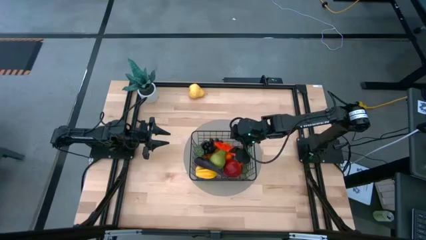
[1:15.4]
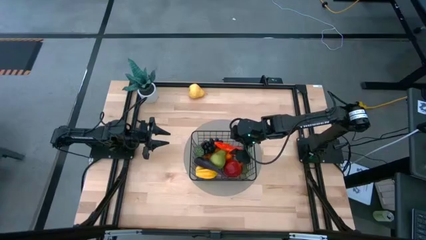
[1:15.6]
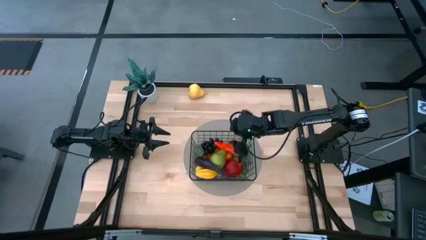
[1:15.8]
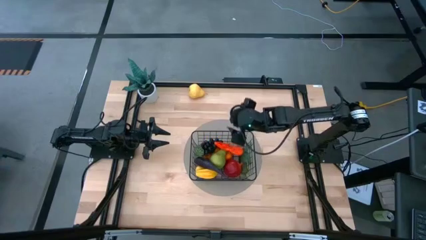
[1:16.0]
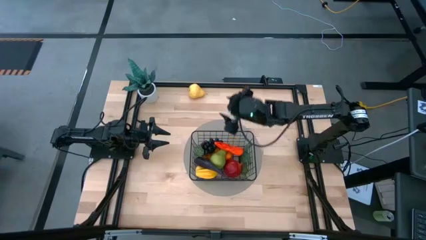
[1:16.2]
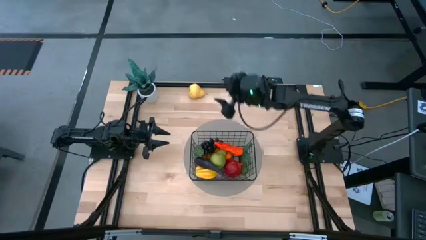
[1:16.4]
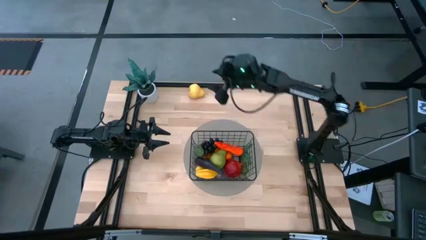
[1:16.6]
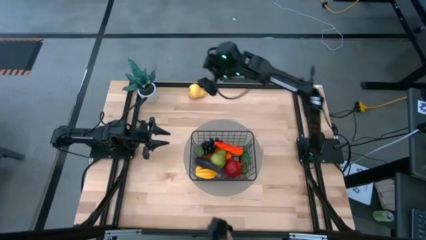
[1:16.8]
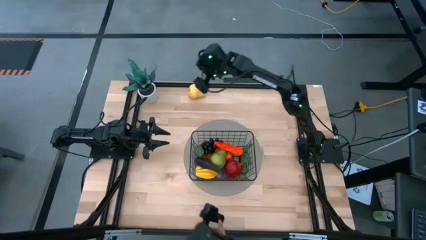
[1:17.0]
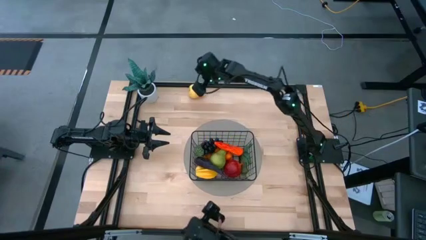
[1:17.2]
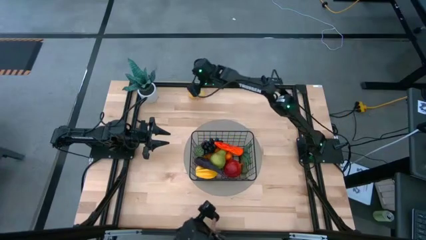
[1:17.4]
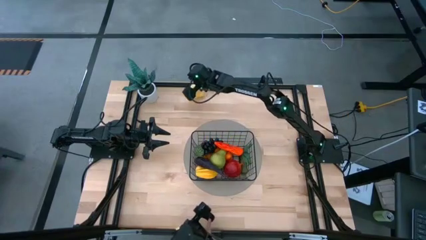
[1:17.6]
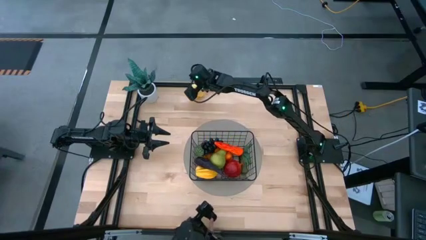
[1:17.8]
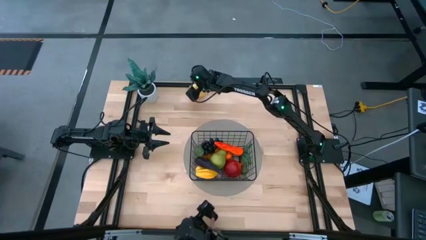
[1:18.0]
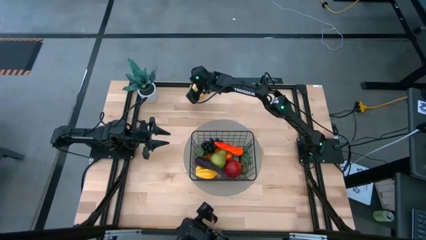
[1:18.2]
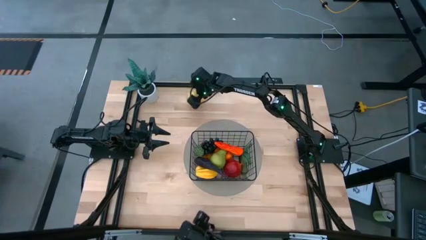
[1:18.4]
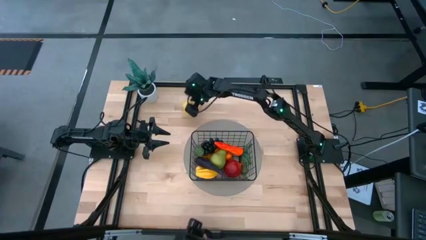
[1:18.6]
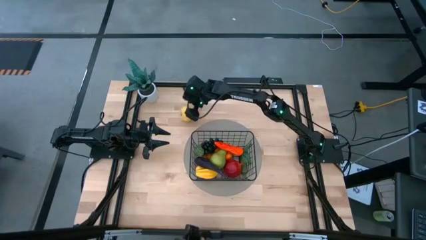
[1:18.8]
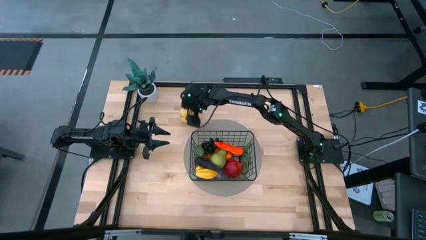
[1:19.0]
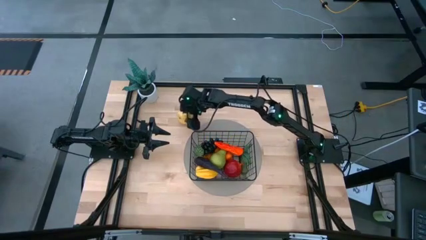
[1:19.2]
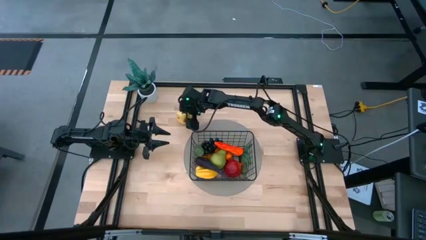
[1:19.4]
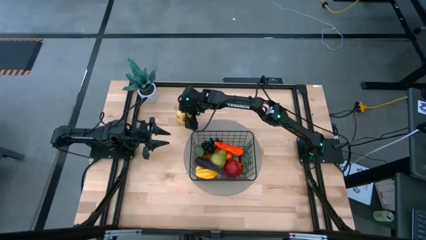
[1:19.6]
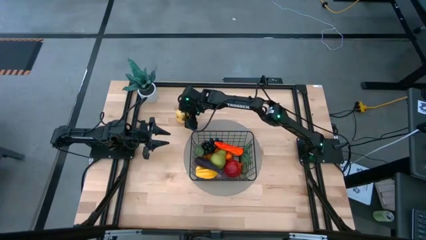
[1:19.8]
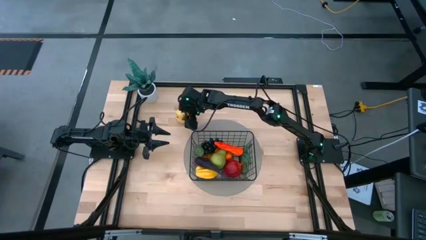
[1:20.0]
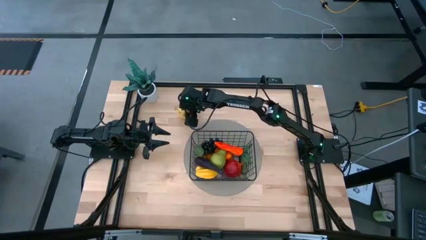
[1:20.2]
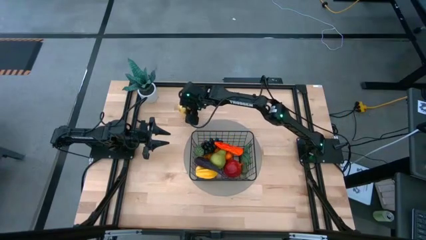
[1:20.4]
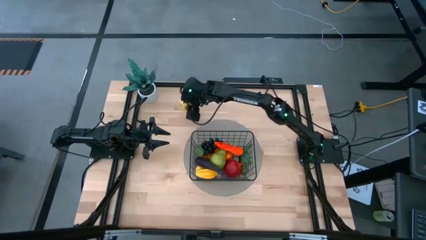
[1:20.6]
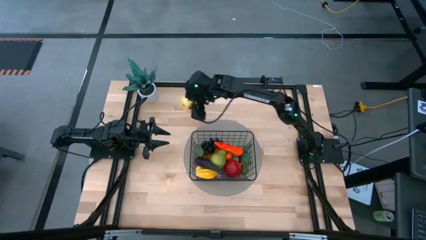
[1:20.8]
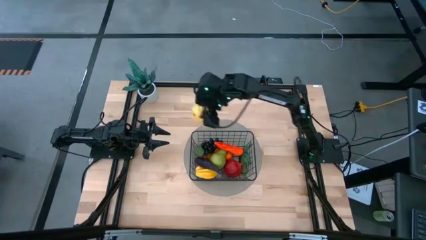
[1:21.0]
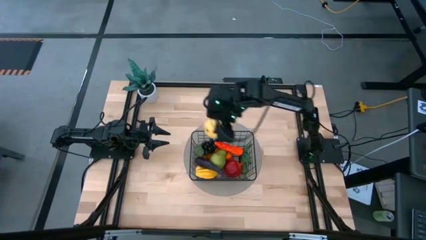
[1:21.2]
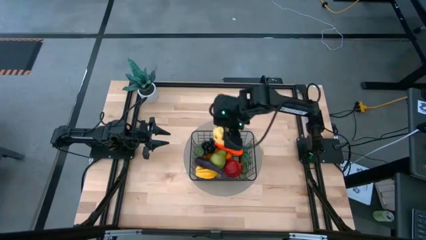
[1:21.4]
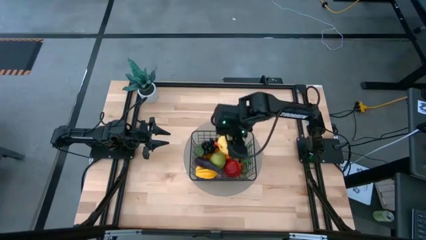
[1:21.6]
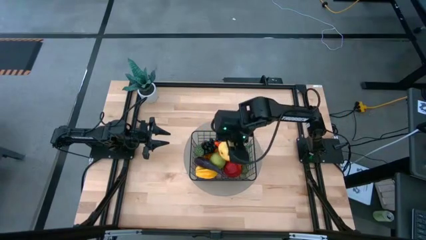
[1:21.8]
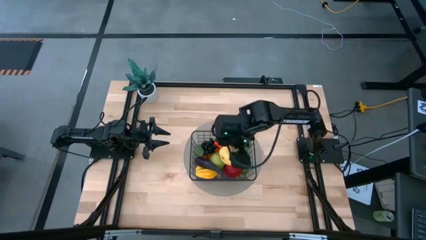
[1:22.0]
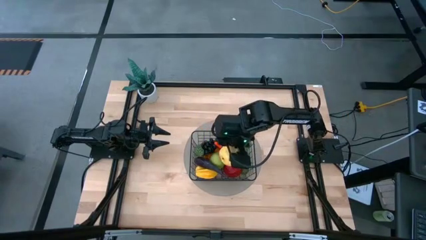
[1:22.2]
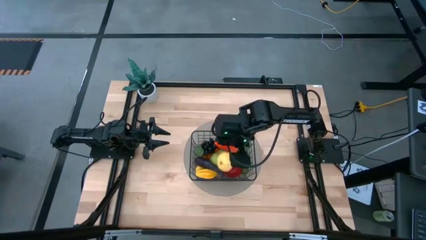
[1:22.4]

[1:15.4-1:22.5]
Task: Build produce basket
Put the yellow pear into the black wire basket

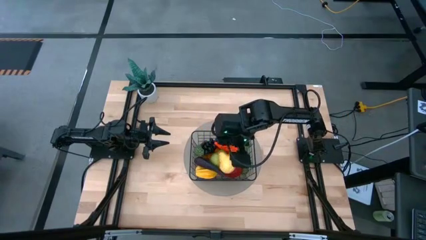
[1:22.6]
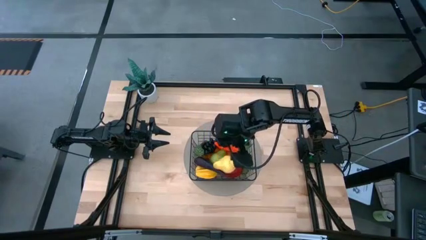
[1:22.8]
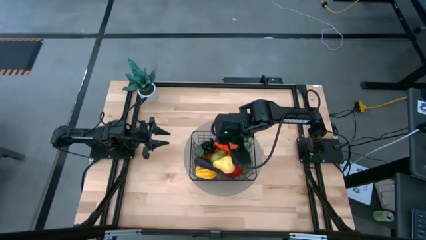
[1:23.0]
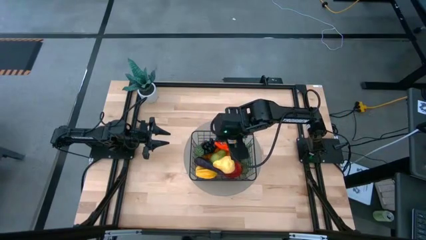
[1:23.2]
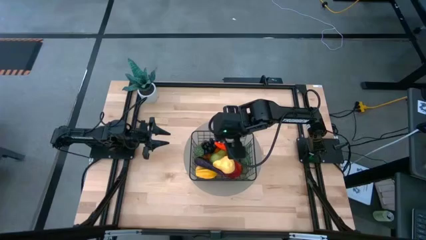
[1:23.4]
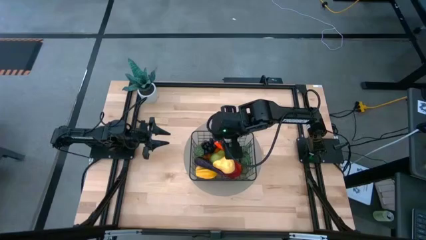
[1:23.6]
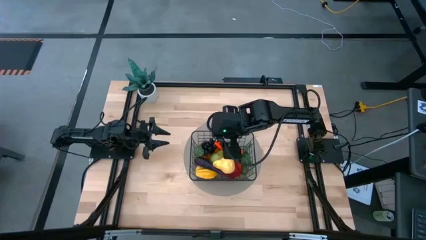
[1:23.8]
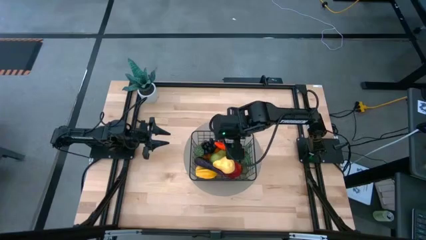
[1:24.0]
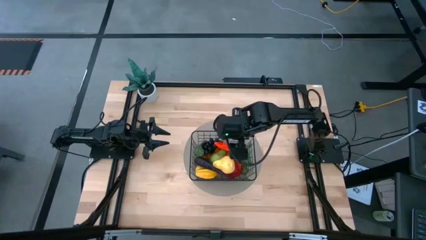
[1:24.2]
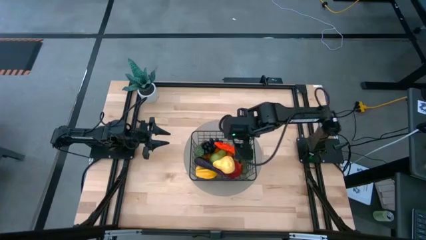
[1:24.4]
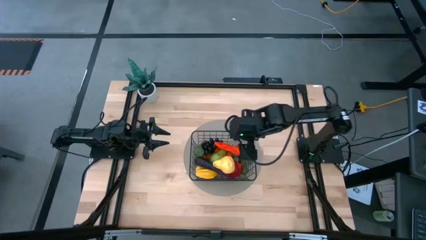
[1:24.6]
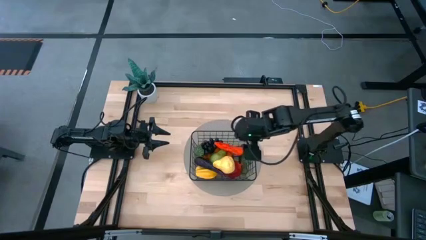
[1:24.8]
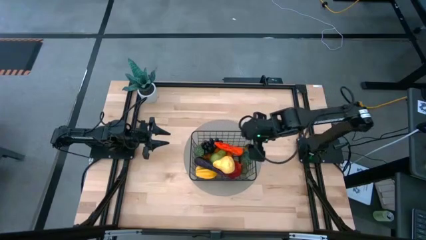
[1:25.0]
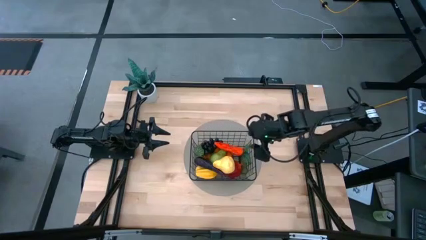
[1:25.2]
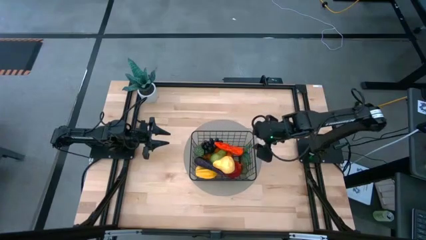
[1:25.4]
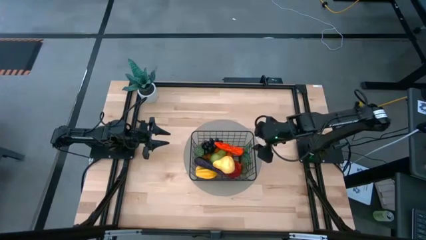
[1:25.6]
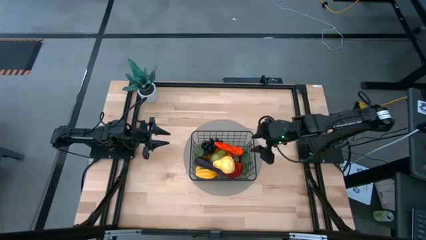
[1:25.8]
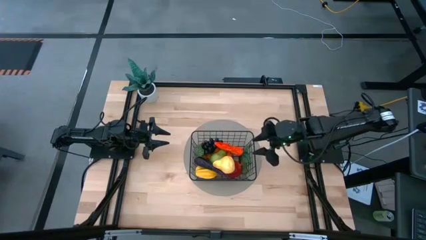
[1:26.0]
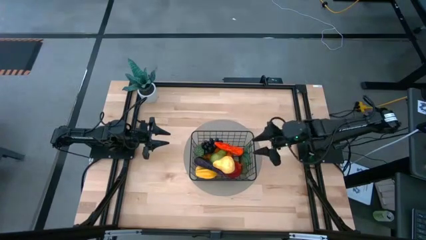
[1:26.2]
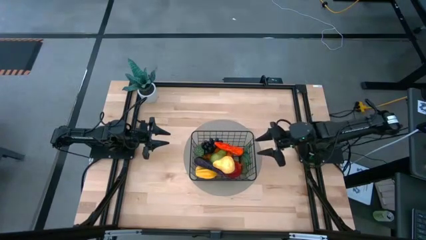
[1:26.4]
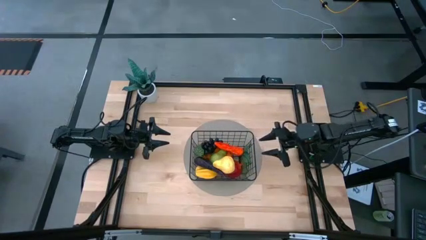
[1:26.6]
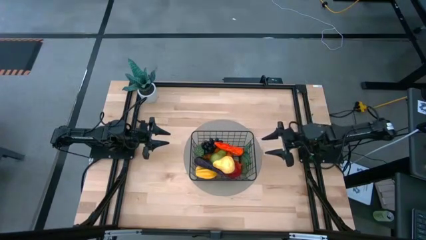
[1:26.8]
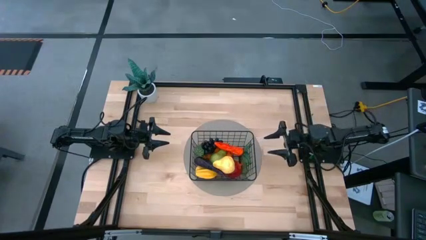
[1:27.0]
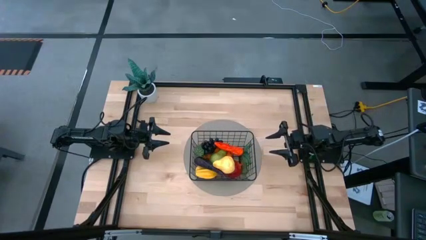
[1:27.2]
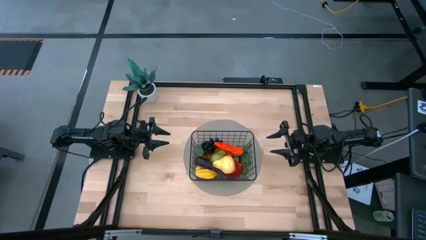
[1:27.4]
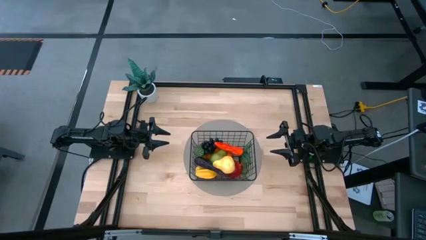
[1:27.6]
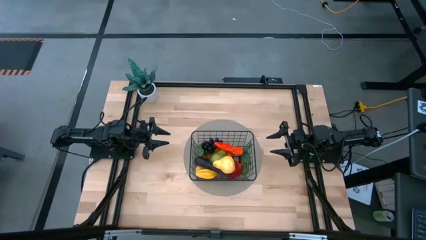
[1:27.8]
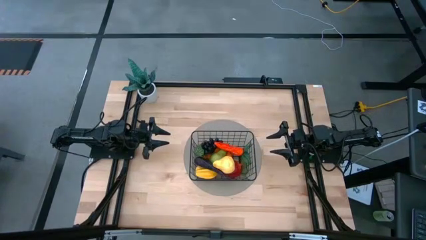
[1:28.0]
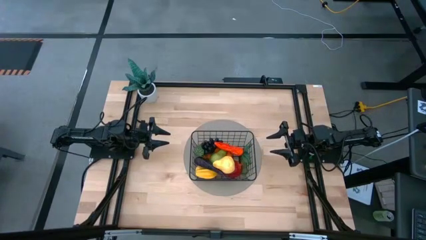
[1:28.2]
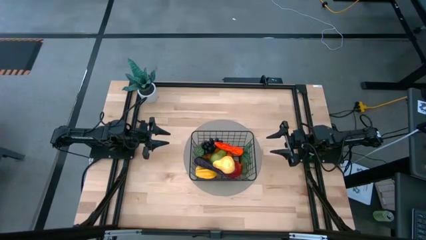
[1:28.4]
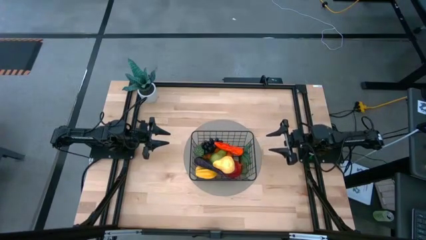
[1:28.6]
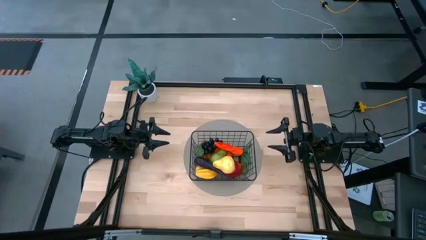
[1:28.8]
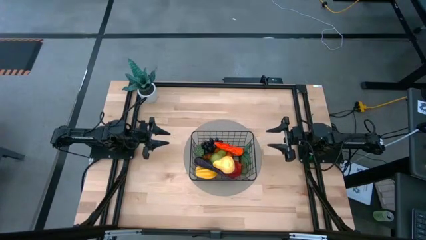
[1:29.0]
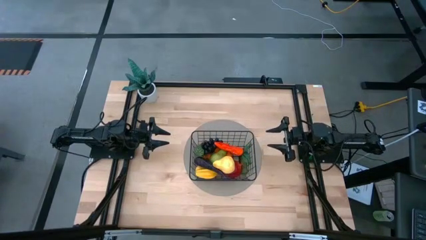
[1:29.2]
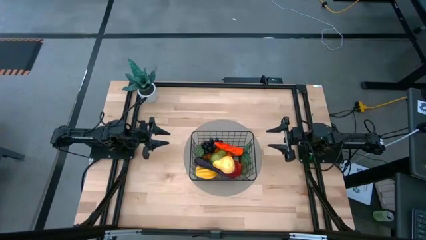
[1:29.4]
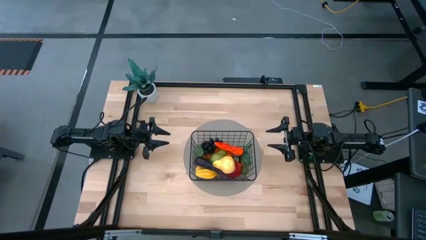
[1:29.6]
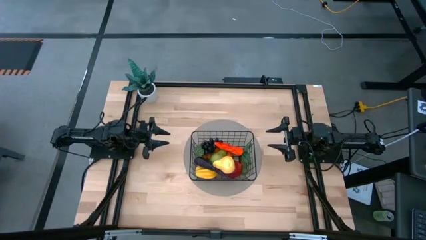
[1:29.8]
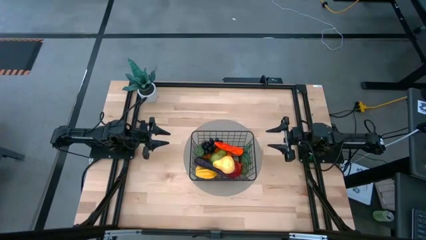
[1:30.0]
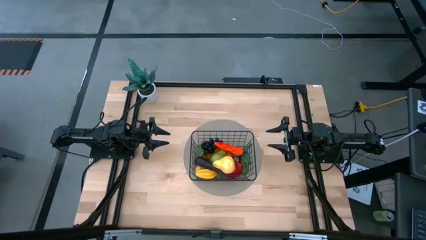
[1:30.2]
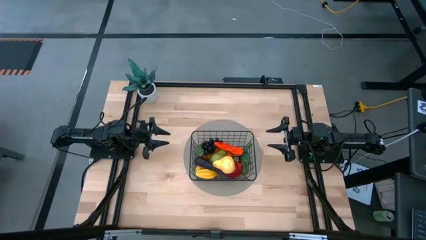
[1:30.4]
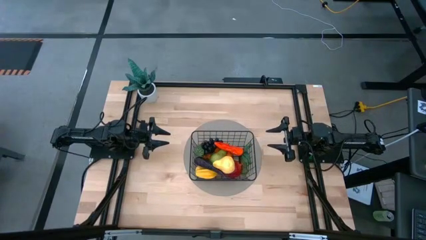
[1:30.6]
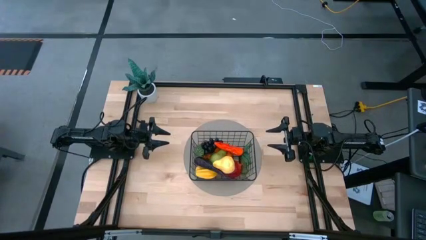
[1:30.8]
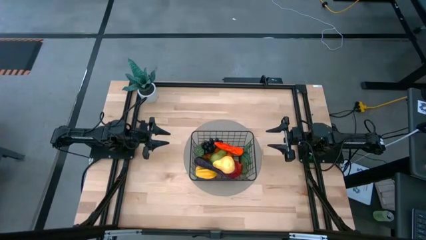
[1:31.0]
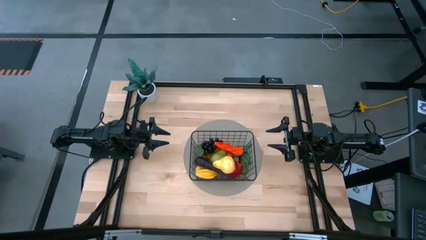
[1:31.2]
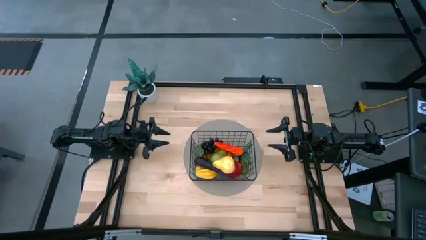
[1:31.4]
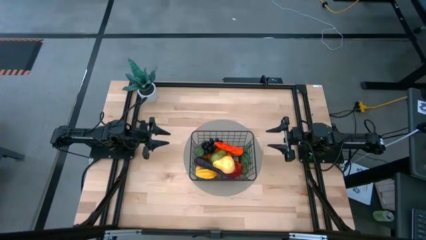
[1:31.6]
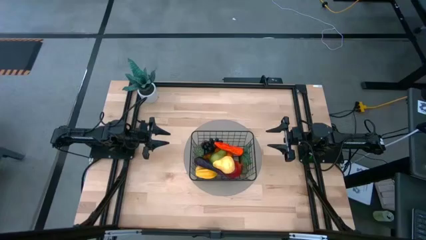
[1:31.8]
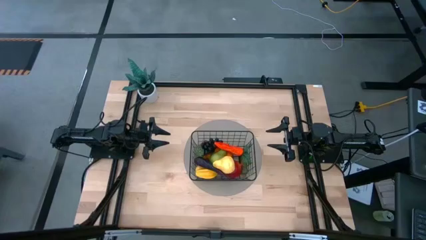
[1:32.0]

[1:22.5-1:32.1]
Return to Home Position
